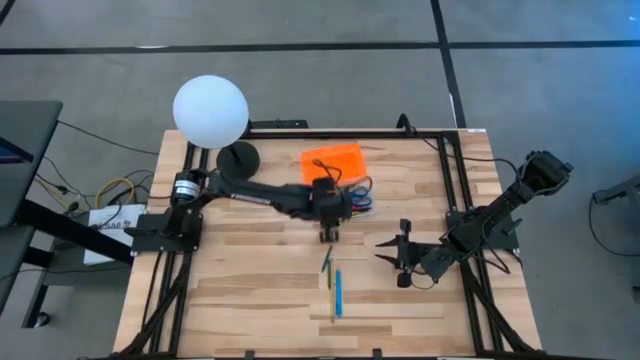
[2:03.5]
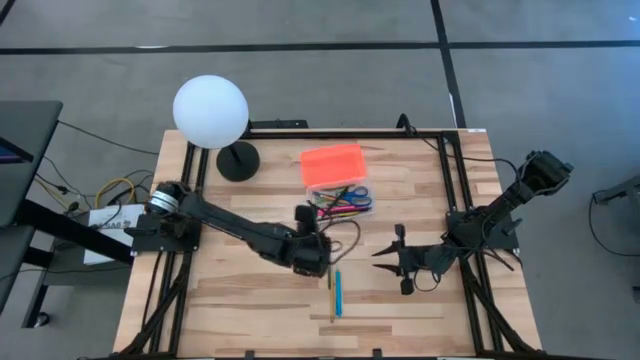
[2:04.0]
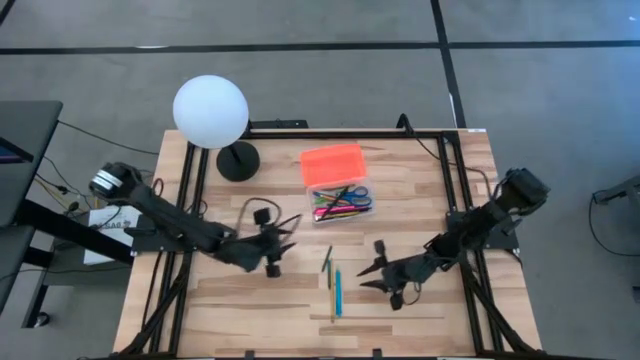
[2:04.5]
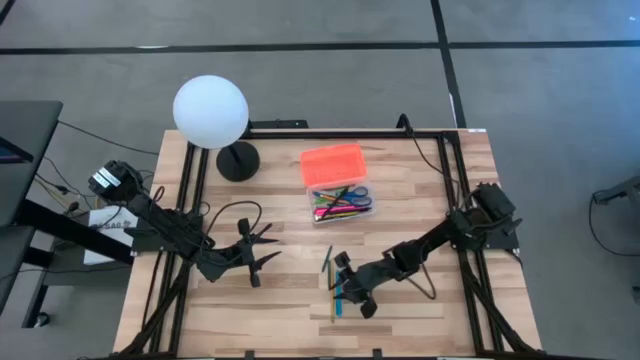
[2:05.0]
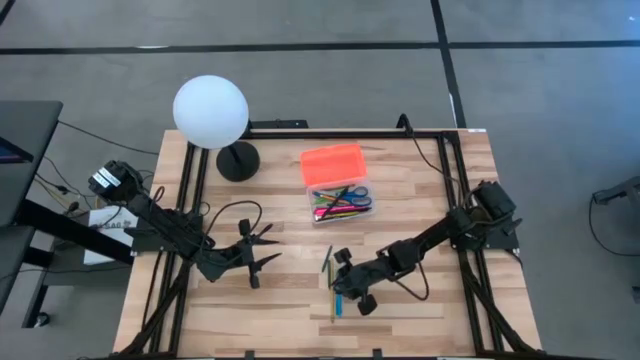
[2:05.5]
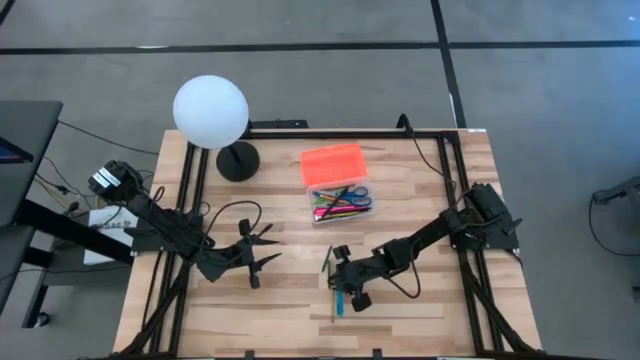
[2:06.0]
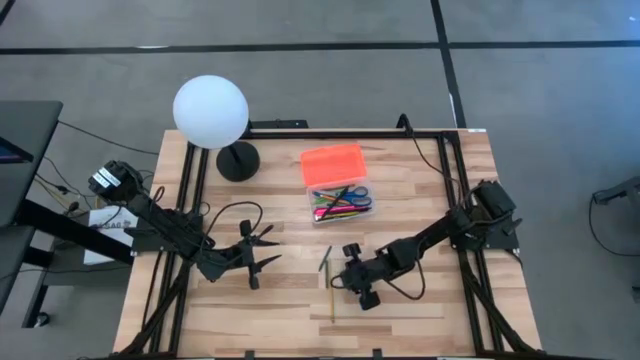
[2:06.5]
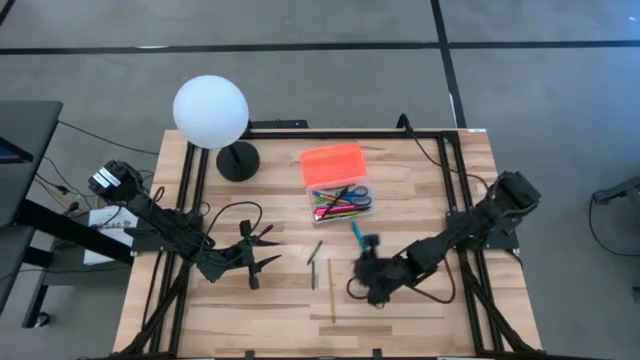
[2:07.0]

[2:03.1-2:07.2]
Task: Pick & place school supplies into a supply box
Put the blue pen into the orange supply box

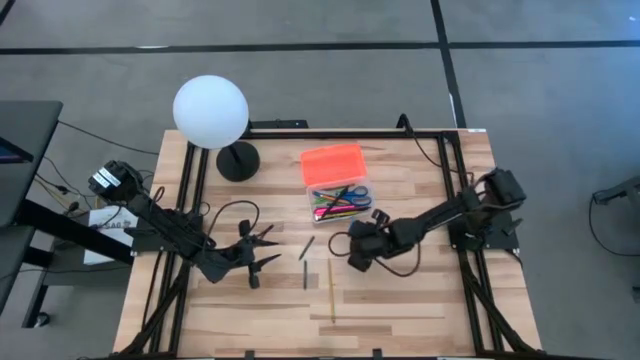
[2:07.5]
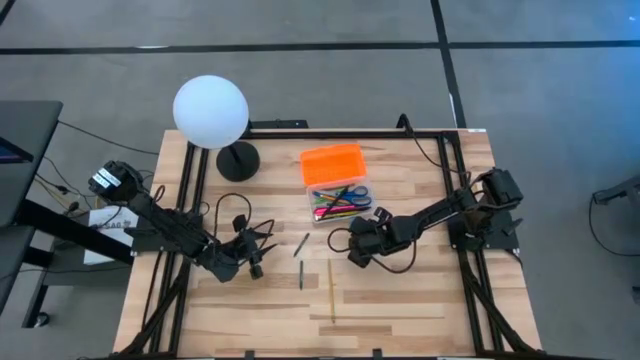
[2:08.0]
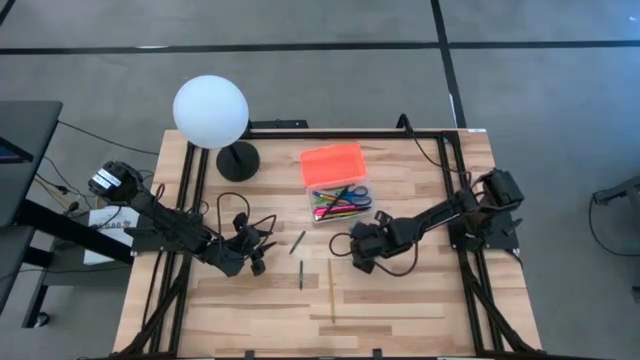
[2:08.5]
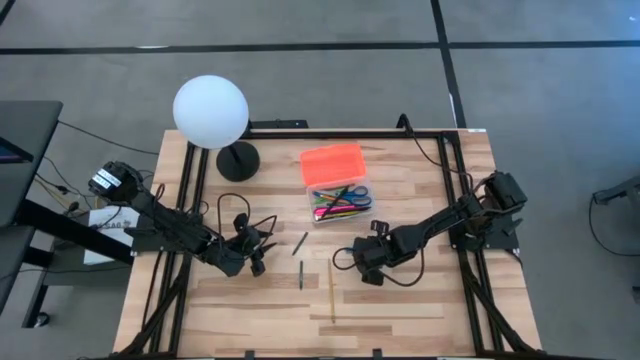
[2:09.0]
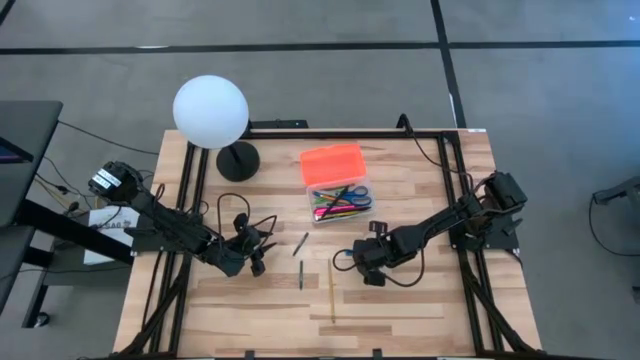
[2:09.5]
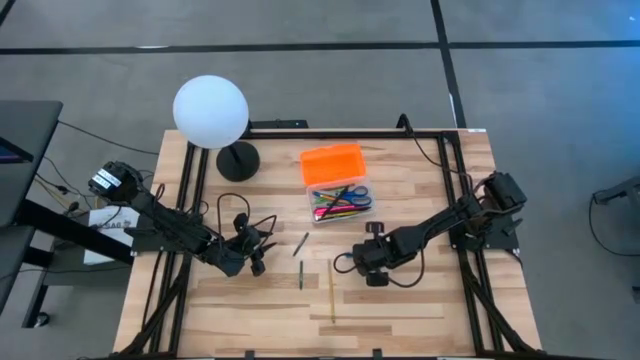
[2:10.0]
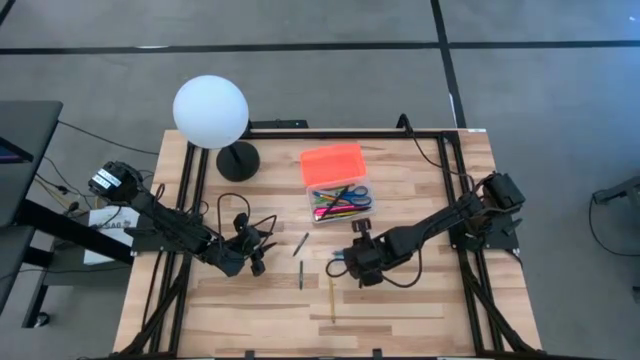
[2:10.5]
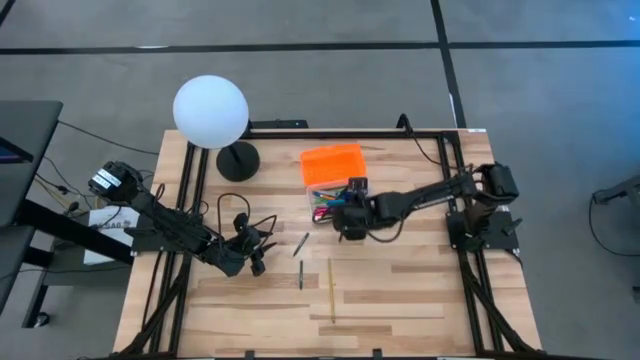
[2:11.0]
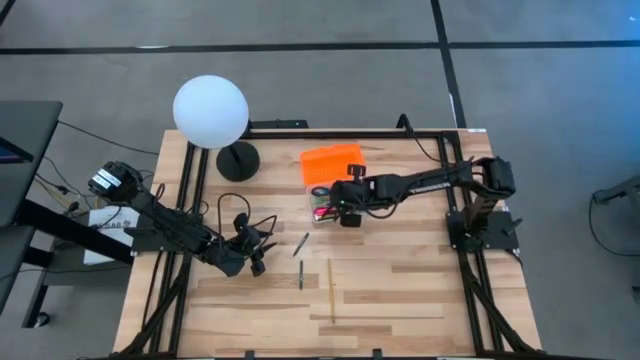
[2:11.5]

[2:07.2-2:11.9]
Put the blue pen into the orange supply box

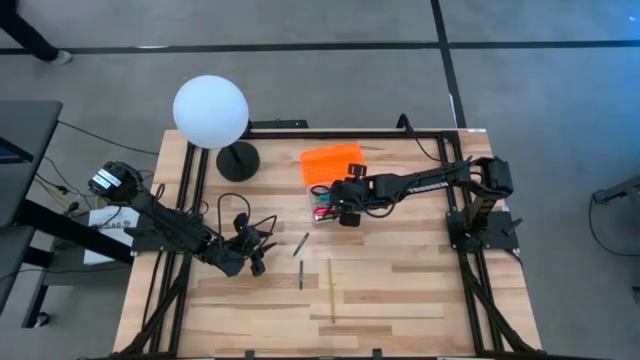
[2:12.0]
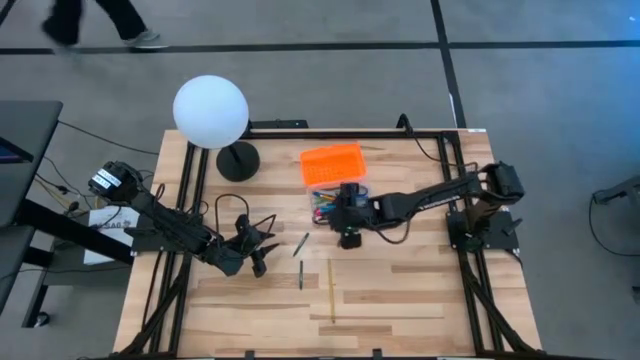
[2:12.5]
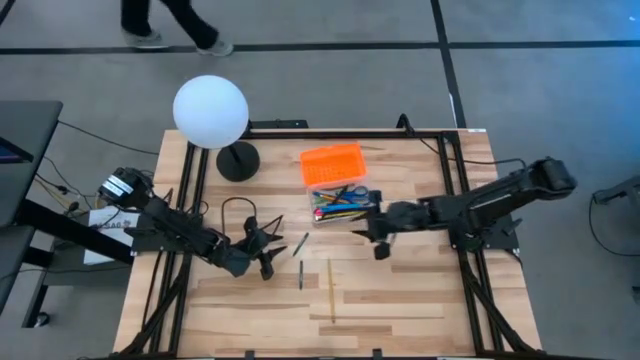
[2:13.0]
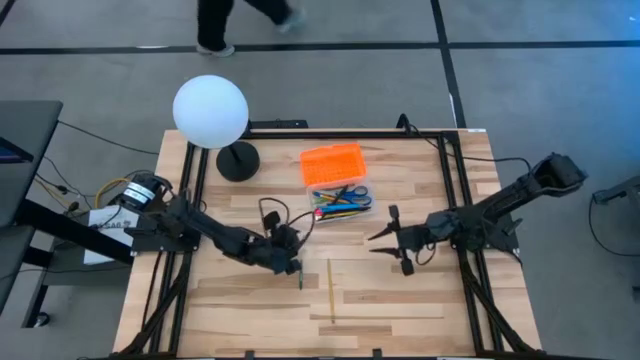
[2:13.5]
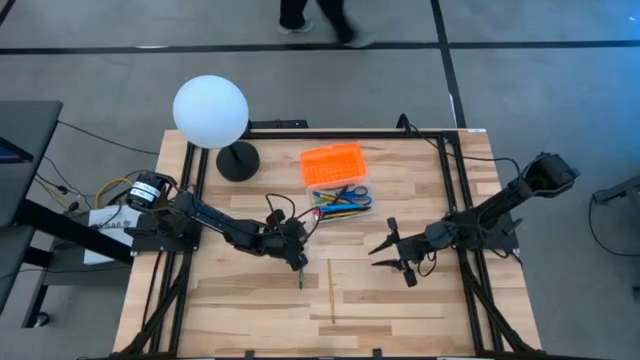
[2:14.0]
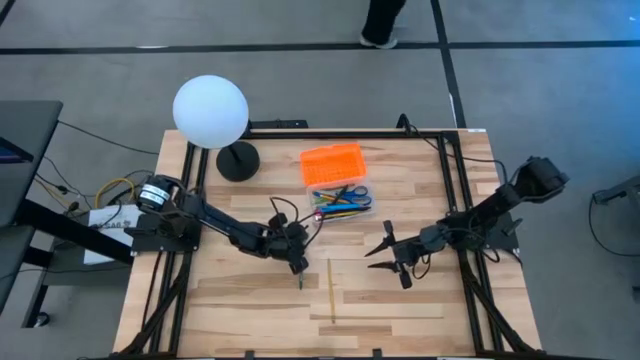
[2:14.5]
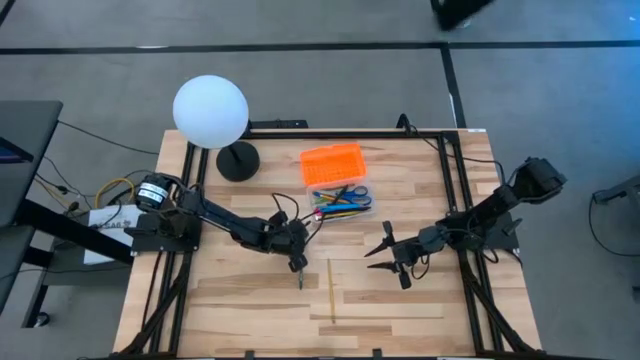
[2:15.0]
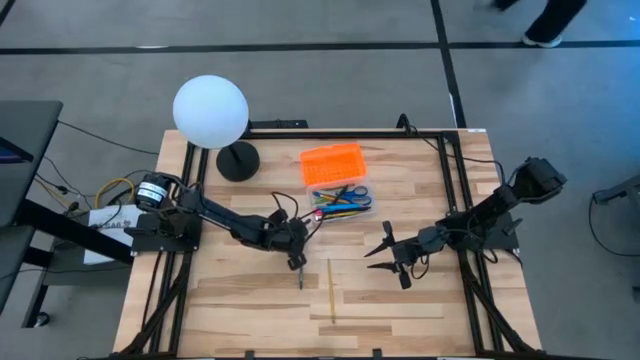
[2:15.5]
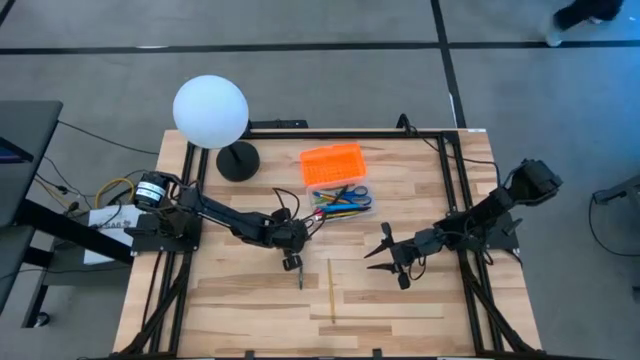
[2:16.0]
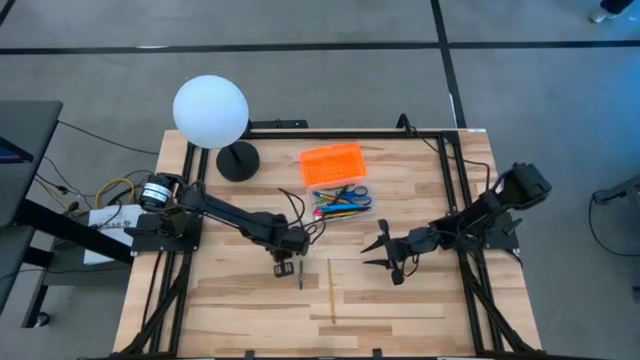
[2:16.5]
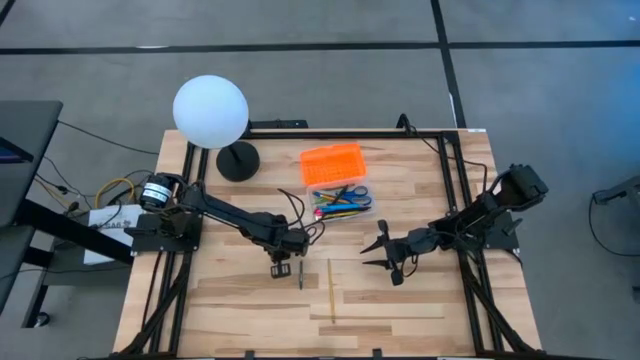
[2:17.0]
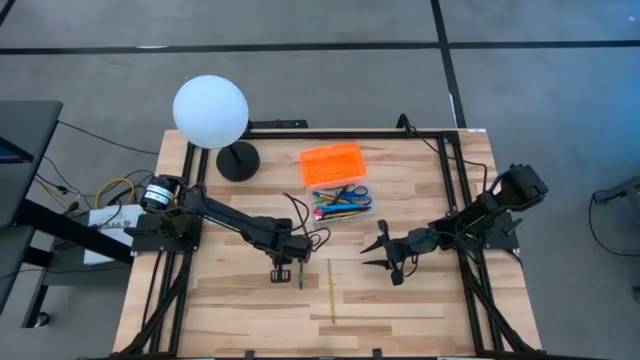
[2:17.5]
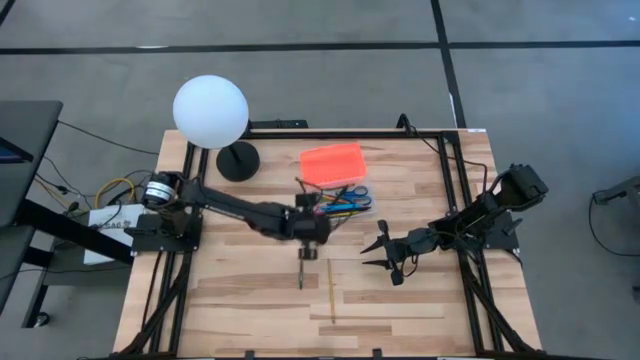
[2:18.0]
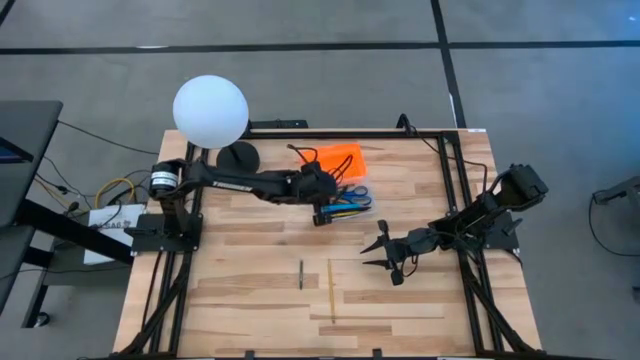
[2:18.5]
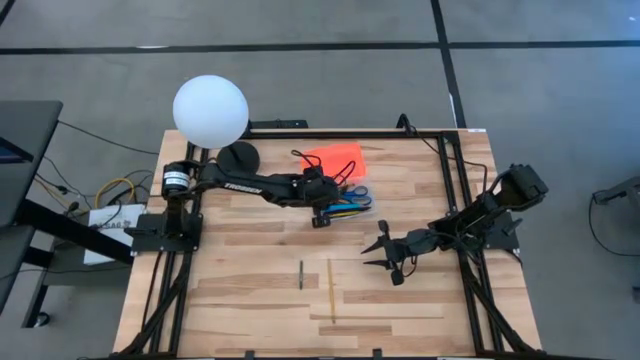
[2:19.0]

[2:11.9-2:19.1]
Put the green crayon into the orange supply box

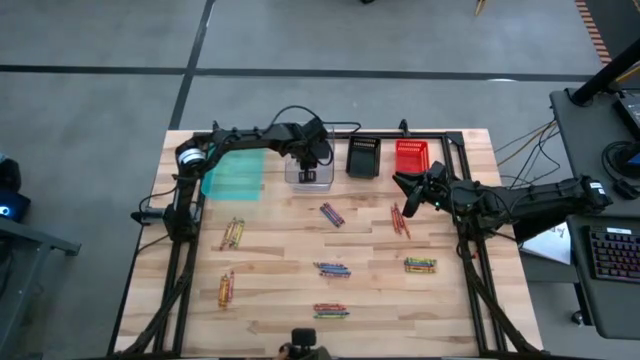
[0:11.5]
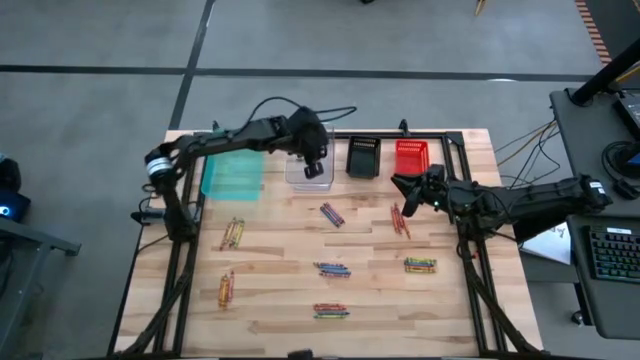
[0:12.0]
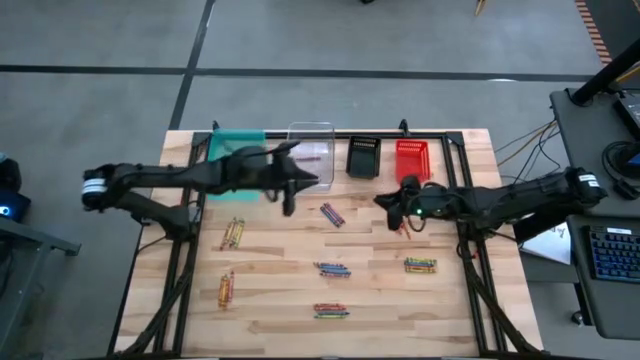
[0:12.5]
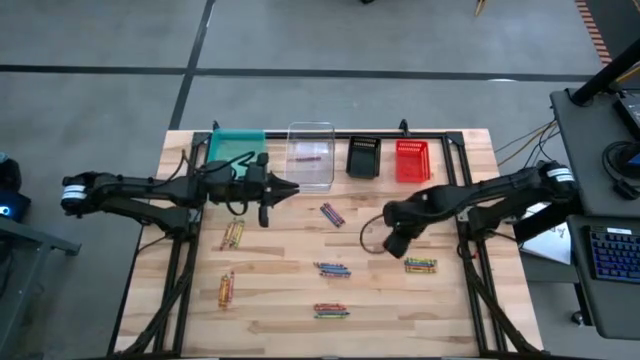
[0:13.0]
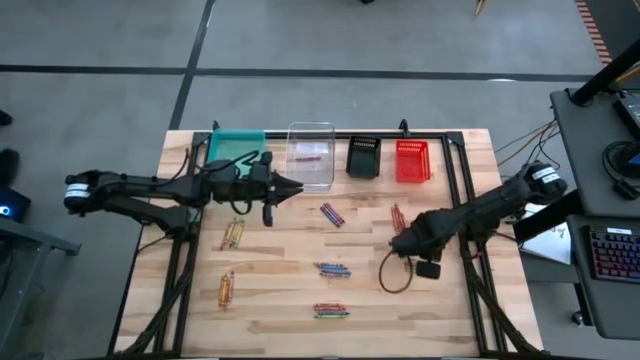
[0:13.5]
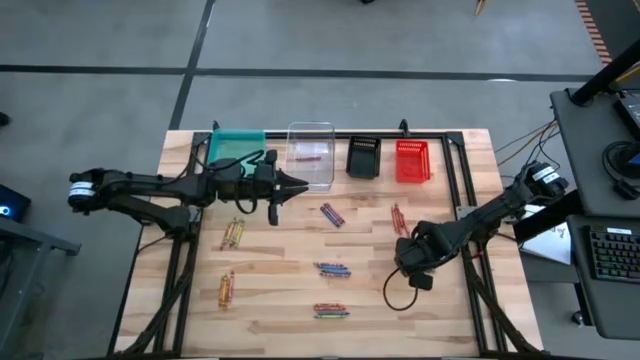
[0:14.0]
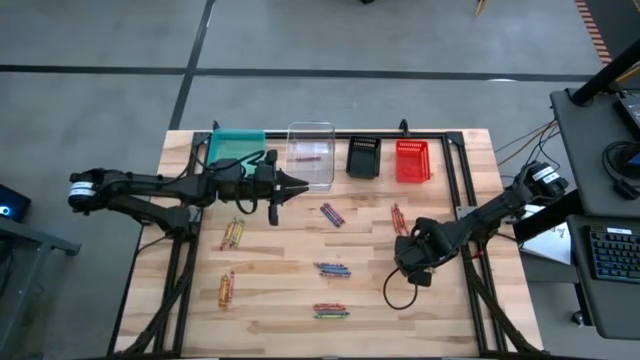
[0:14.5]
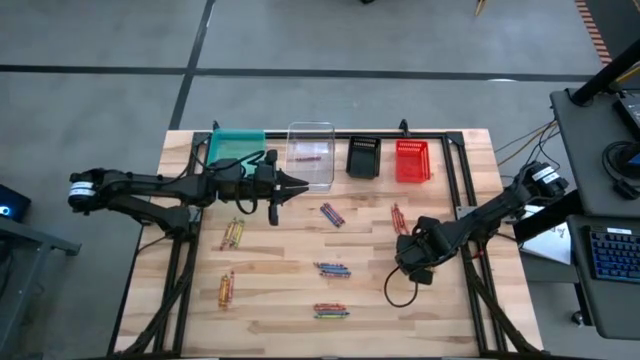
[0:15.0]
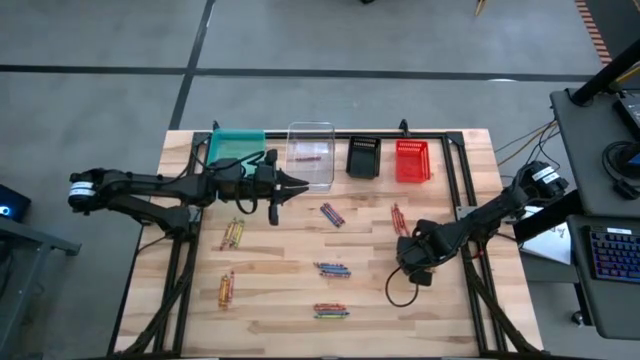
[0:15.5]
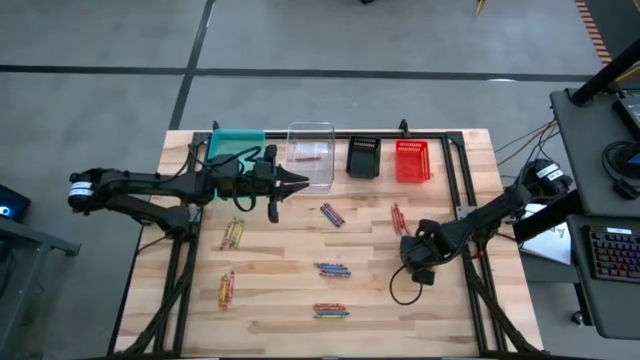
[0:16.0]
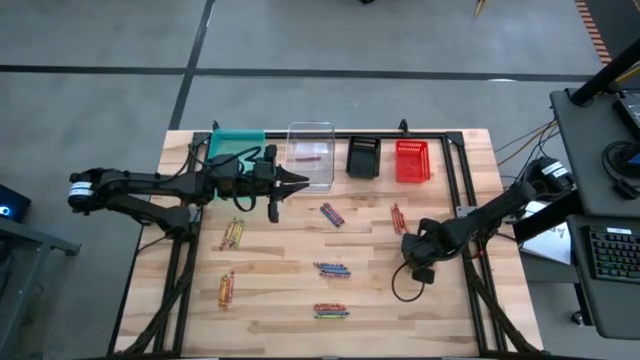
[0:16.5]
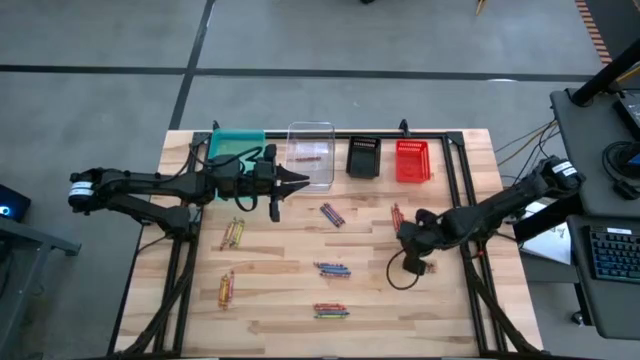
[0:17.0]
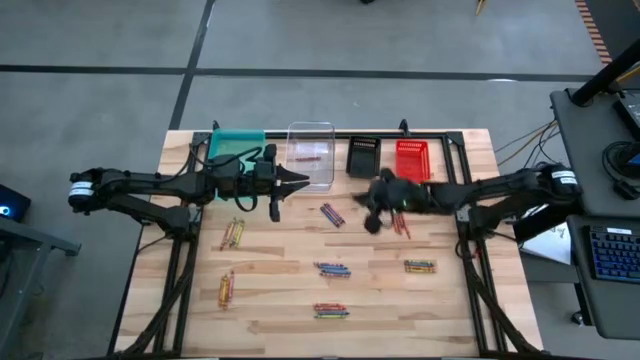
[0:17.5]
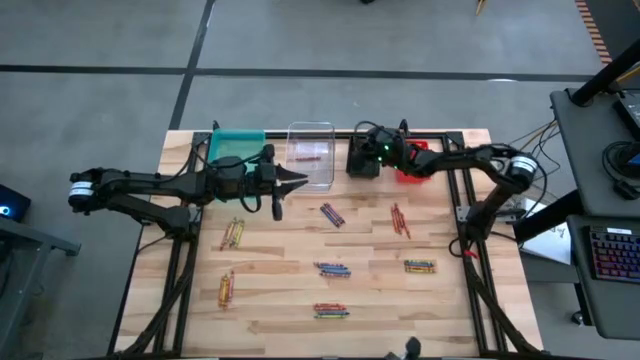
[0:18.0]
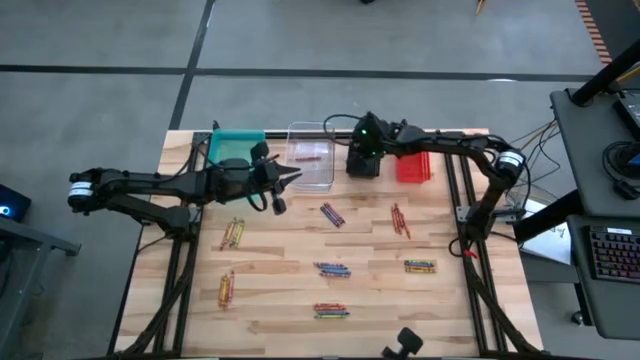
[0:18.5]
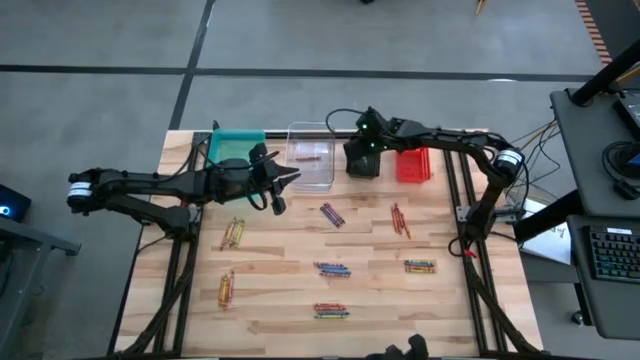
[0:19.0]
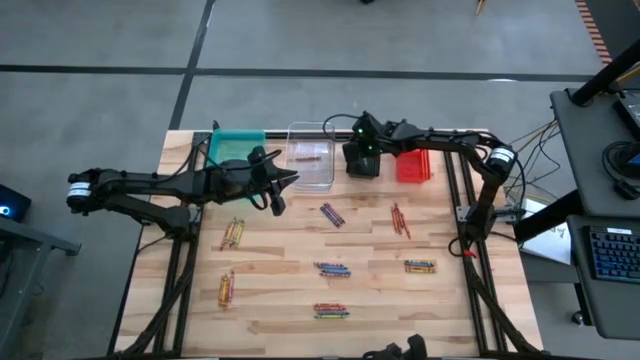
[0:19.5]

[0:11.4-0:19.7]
Task: Sort crayons
Put the green crayon into the black bin
